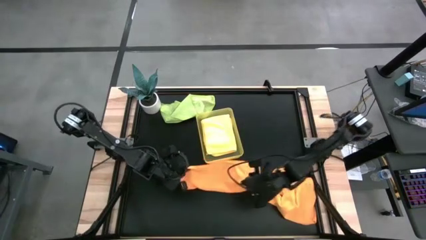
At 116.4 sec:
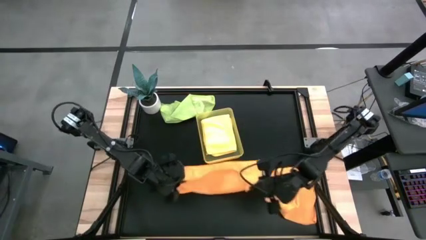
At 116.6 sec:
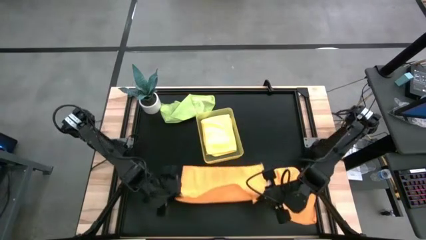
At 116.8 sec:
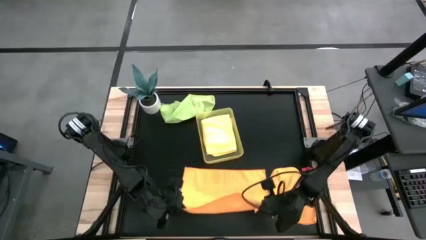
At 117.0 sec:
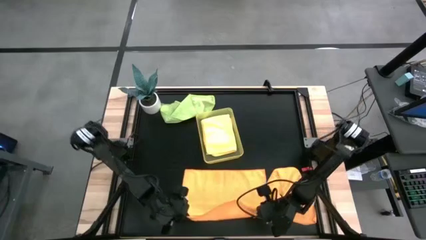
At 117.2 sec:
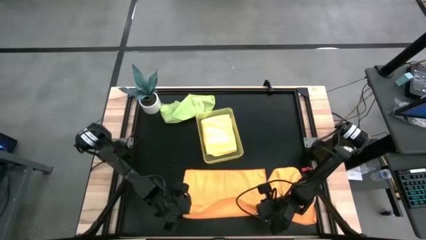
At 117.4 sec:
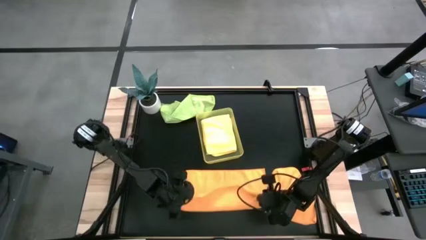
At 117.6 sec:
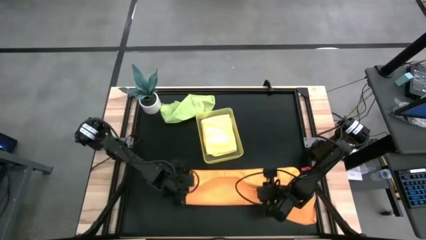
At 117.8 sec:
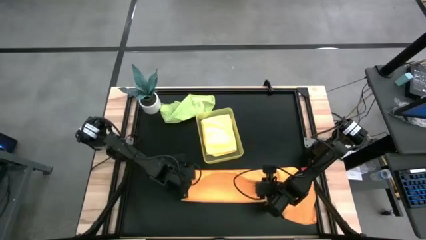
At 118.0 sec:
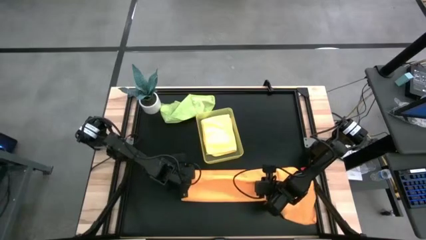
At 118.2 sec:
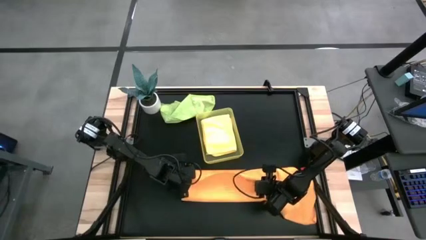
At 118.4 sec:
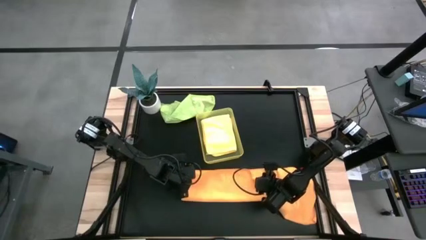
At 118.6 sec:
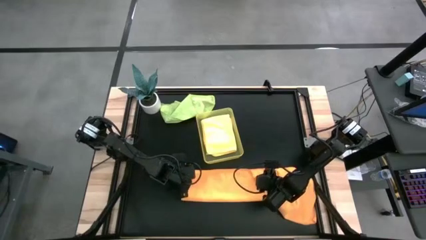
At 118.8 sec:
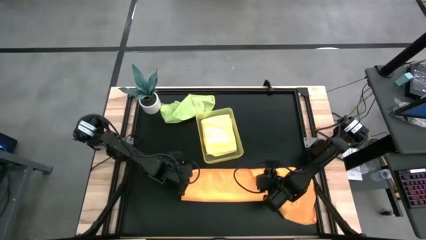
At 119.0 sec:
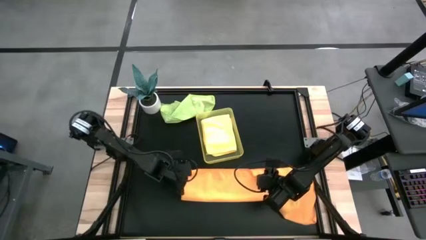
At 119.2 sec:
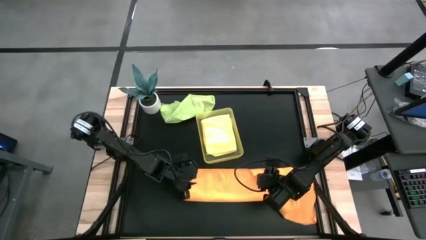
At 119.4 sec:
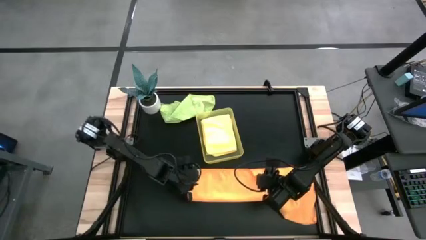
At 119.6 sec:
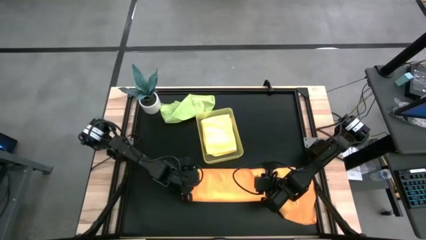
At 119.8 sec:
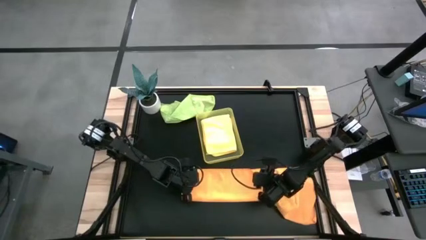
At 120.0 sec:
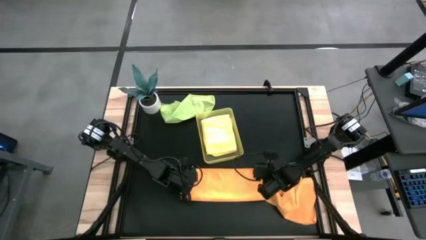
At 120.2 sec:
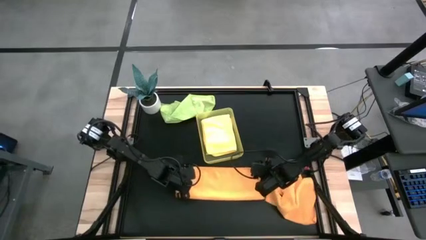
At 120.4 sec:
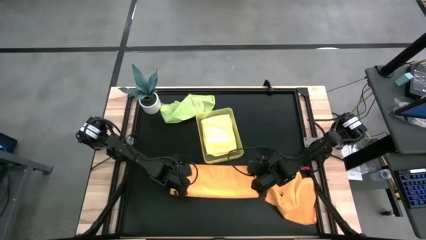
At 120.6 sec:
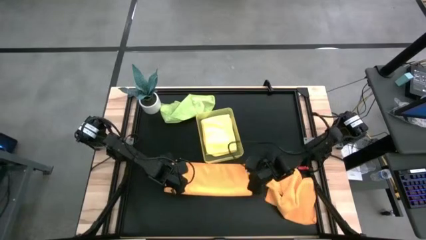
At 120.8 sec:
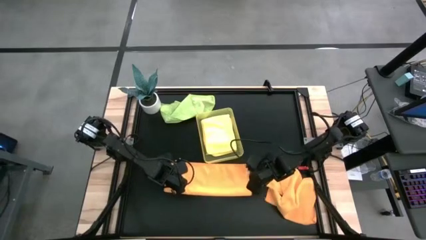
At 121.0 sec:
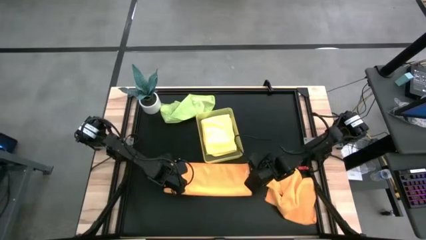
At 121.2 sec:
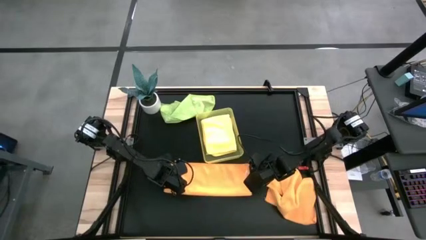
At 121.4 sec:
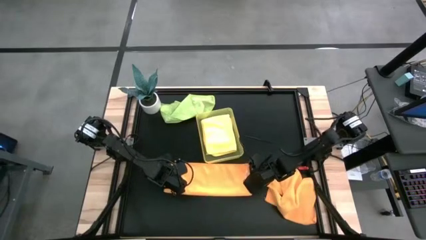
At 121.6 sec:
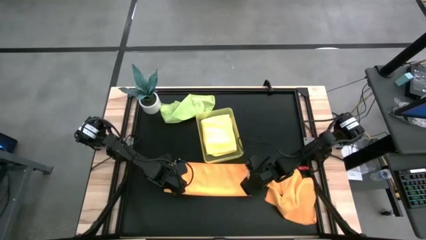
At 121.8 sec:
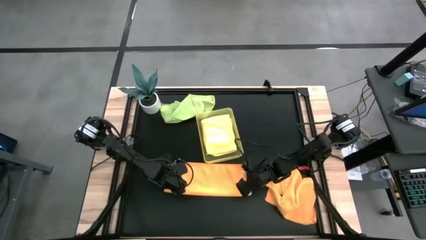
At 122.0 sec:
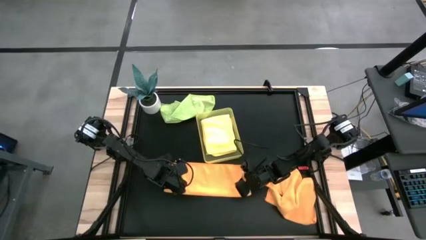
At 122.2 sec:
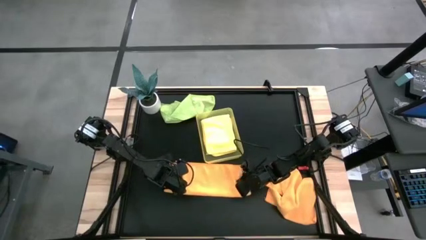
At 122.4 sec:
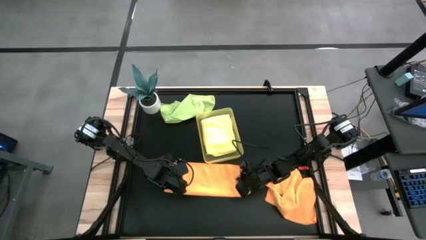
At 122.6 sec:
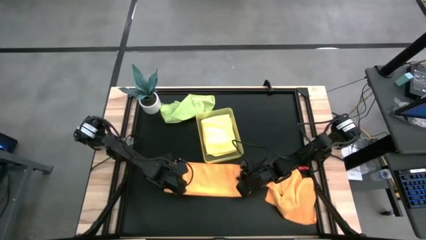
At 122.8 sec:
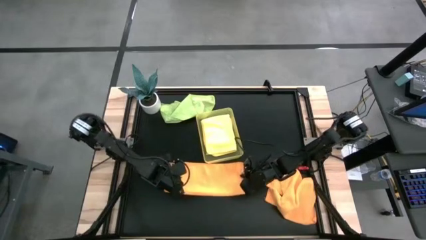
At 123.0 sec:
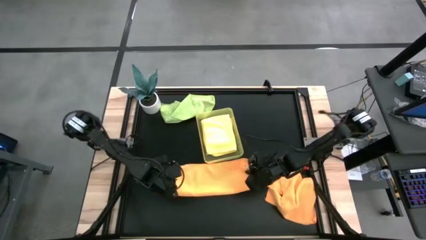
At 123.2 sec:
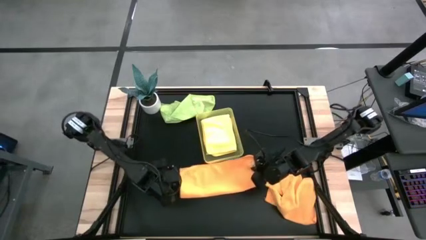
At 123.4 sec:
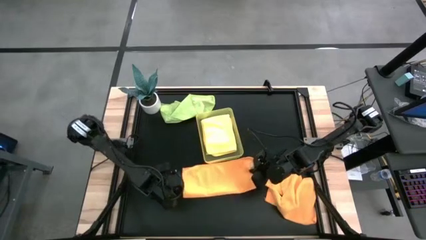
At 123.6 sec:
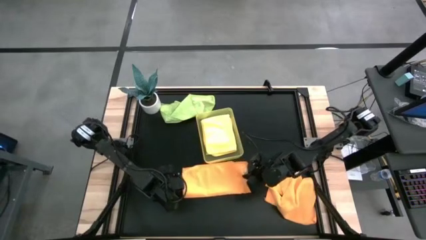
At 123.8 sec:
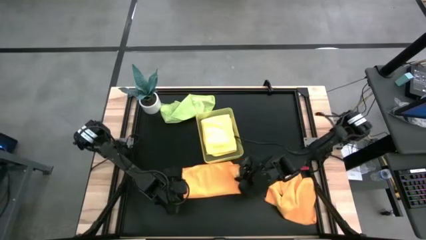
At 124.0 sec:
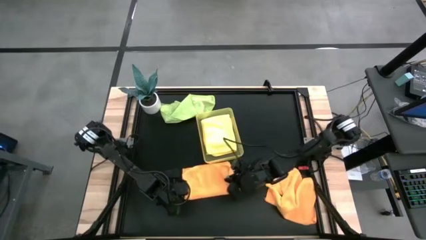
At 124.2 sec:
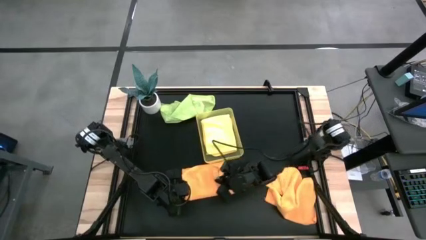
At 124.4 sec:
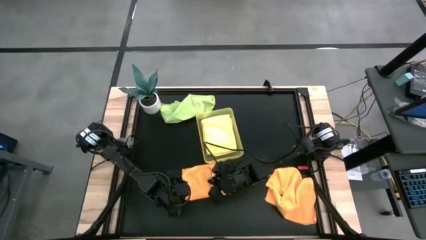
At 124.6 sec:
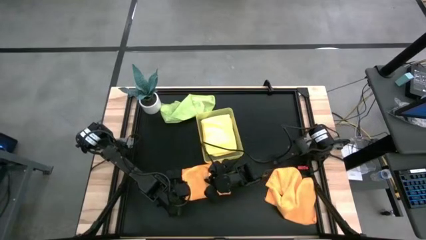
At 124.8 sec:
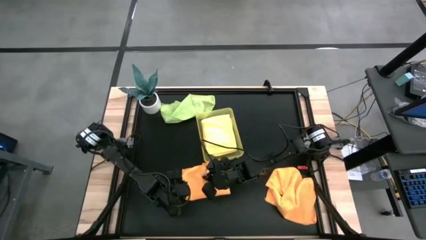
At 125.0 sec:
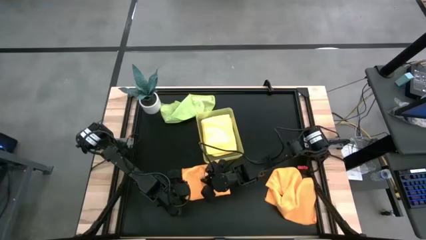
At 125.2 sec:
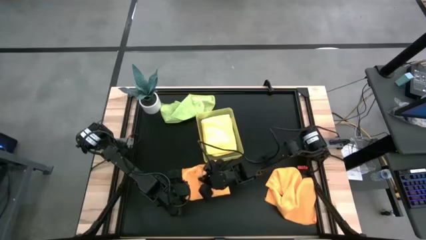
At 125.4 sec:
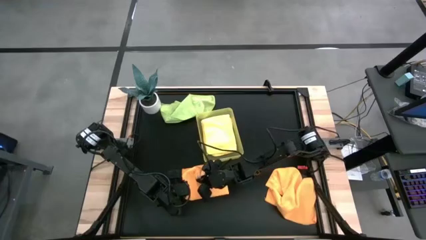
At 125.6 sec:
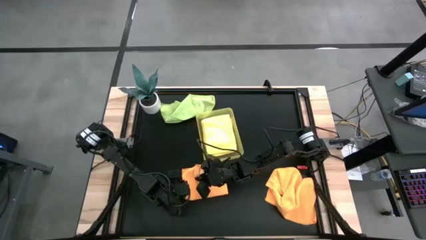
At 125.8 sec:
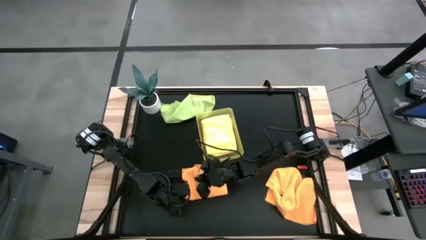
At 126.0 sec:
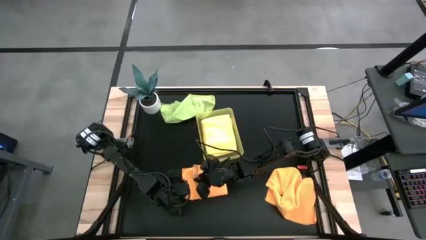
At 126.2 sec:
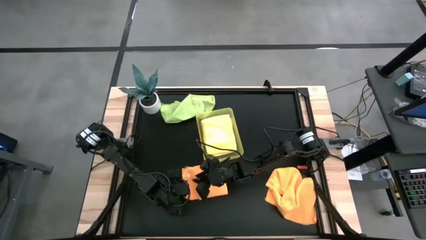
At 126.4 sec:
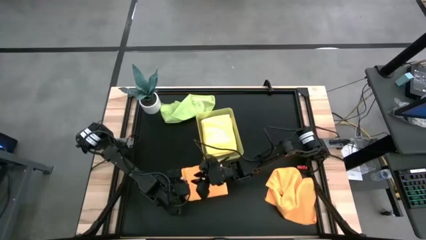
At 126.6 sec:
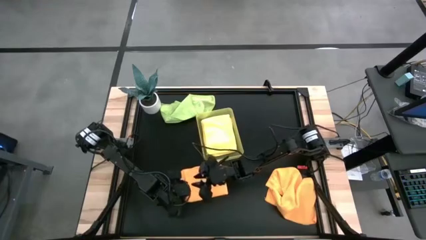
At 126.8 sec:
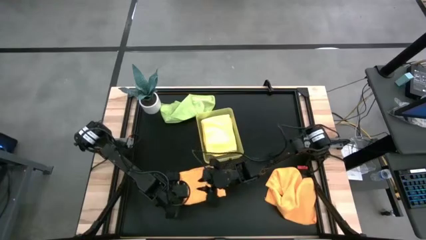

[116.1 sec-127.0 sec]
Task: Fold microfiber towels
Fold the left orange microfiber cloth

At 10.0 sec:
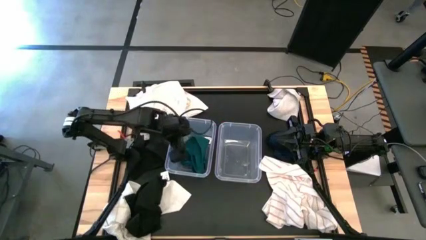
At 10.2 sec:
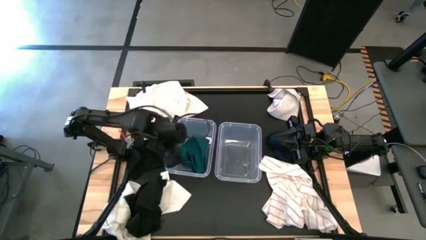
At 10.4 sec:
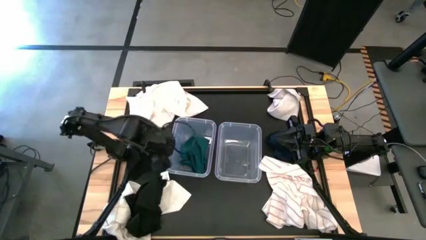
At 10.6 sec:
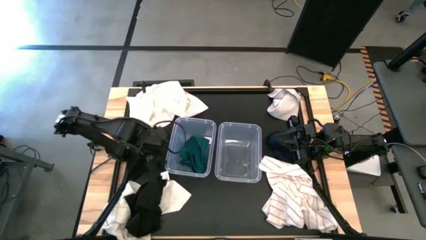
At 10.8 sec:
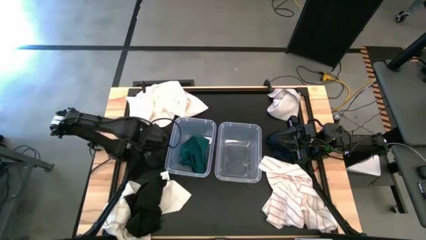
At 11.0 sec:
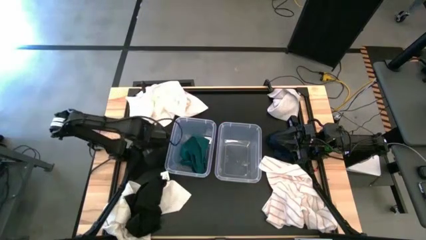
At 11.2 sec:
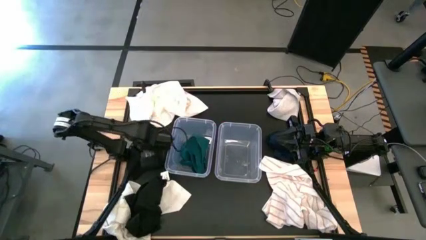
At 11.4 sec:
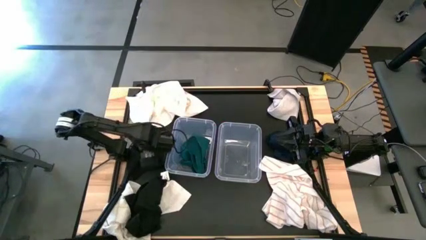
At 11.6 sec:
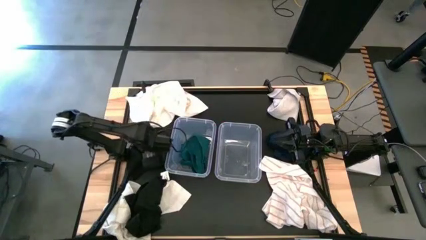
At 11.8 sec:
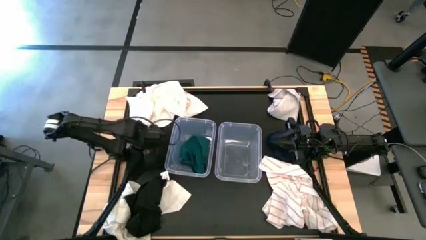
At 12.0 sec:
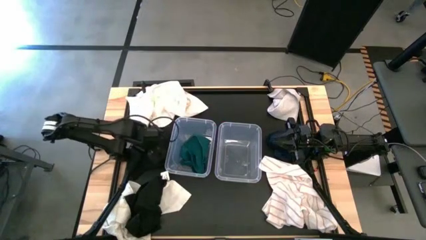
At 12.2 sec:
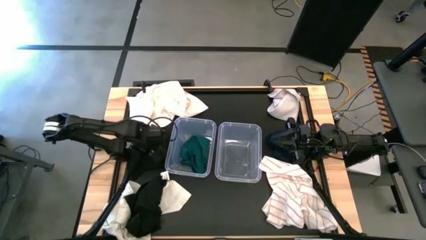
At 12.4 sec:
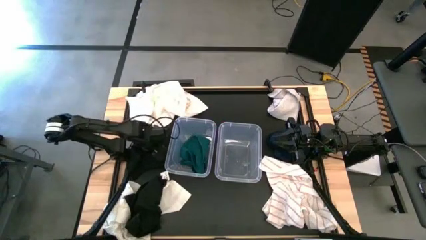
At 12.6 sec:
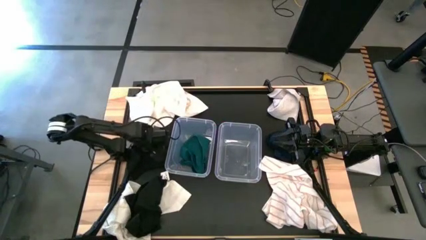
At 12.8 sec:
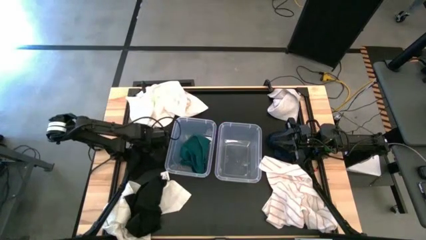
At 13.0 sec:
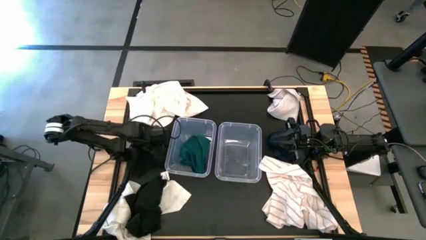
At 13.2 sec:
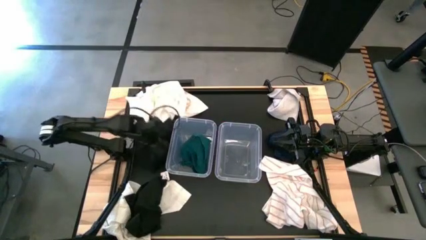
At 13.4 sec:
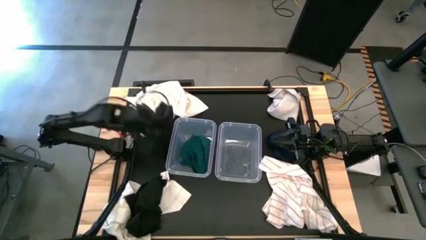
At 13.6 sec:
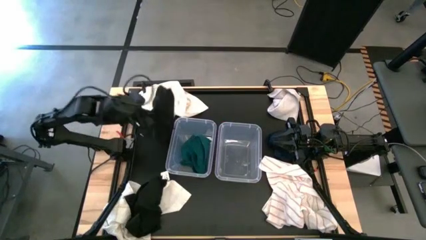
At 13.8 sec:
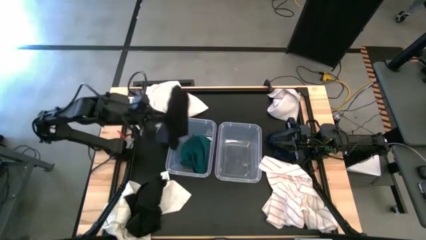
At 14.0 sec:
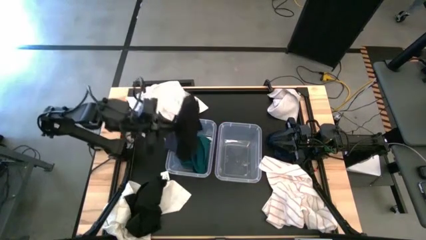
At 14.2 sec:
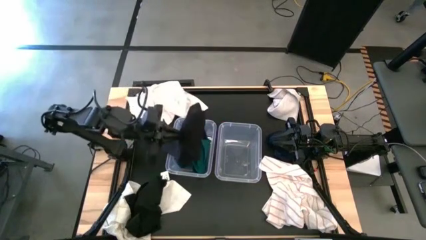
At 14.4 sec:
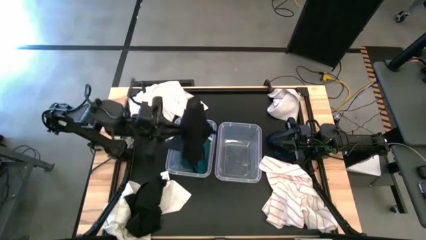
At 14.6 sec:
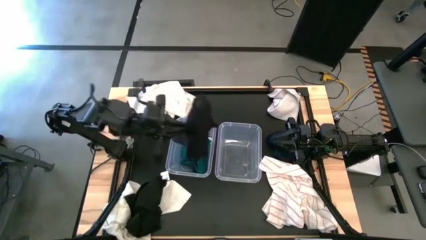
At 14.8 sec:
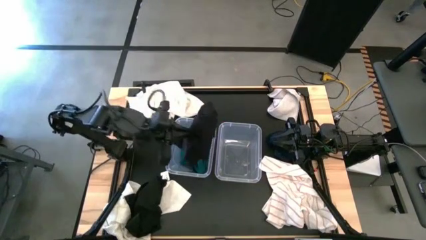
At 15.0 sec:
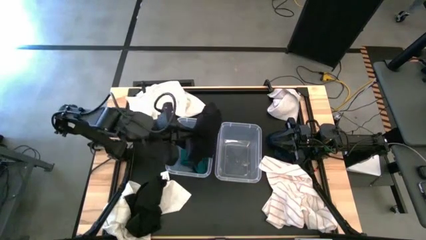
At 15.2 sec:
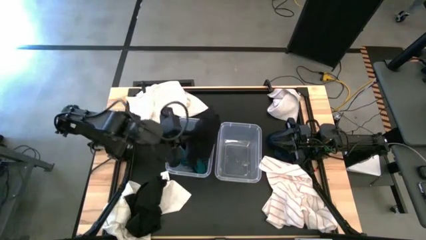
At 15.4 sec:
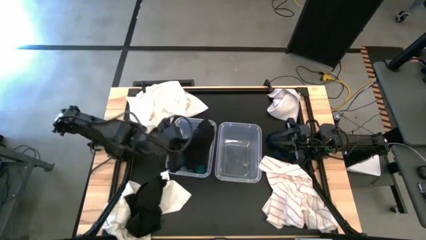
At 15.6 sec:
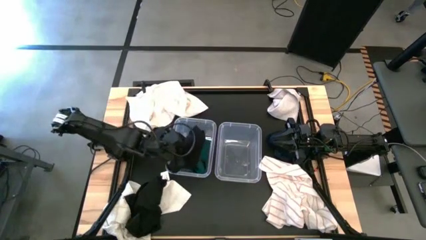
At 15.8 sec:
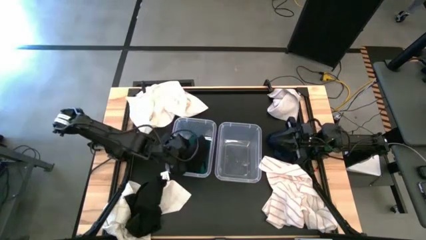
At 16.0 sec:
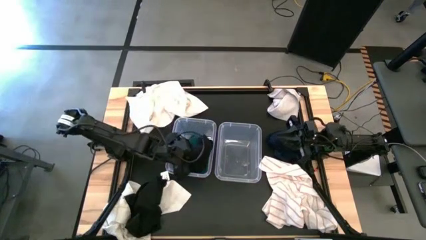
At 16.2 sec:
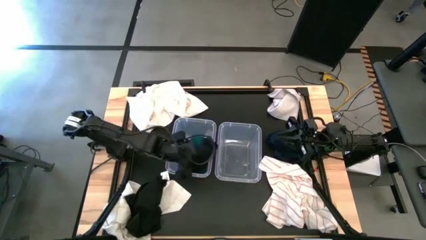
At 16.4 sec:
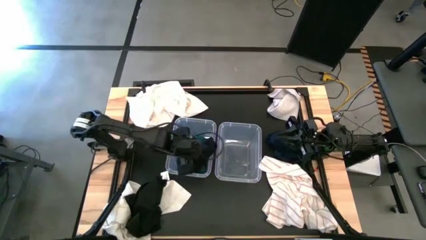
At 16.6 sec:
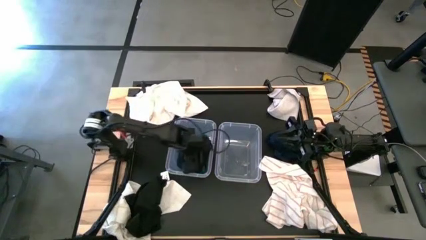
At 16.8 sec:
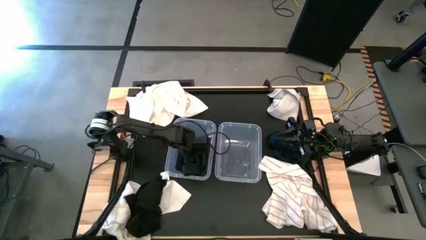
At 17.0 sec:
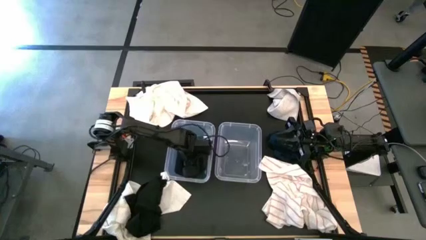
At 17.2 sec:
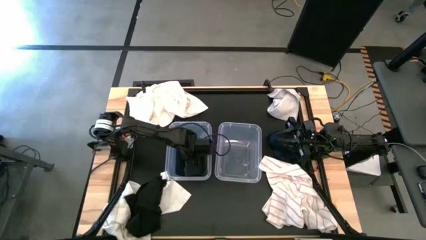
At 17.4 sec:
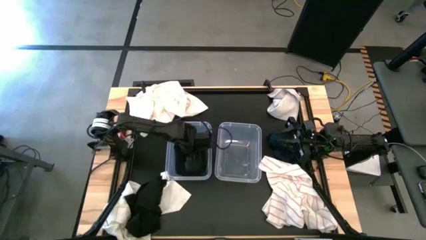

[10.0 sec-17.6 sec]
Task: Sort towels by color in basket
Put the top black towel into the left transparent bin
